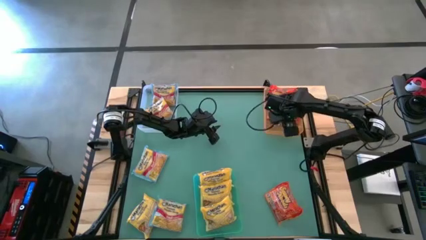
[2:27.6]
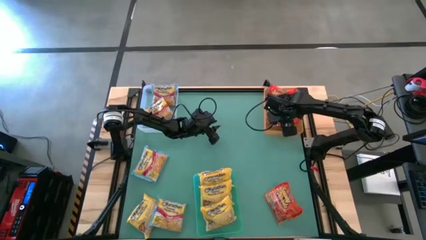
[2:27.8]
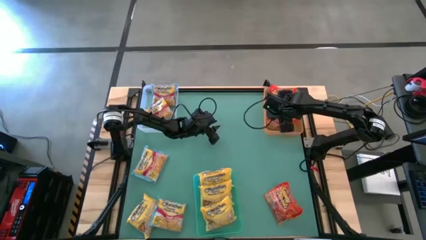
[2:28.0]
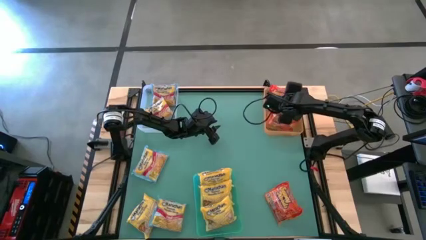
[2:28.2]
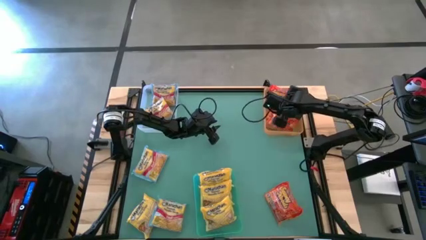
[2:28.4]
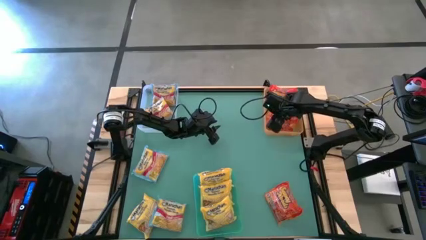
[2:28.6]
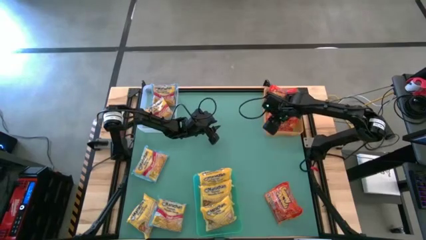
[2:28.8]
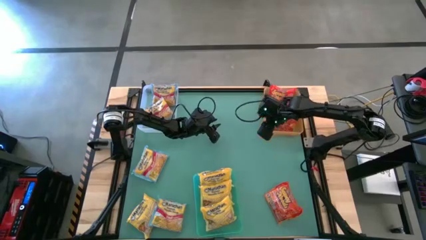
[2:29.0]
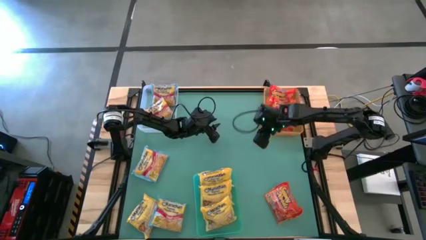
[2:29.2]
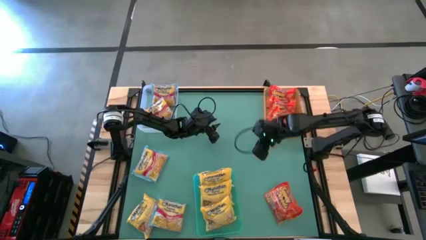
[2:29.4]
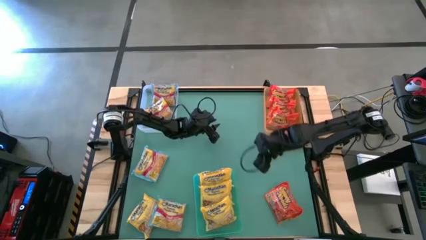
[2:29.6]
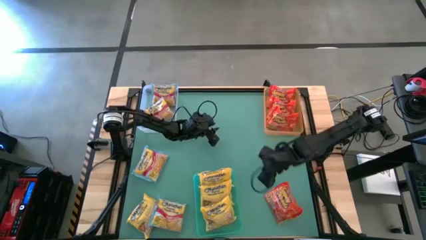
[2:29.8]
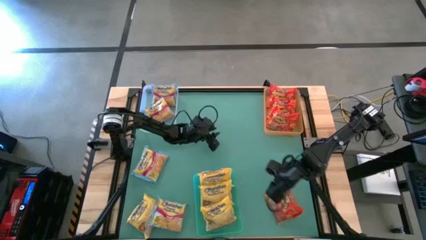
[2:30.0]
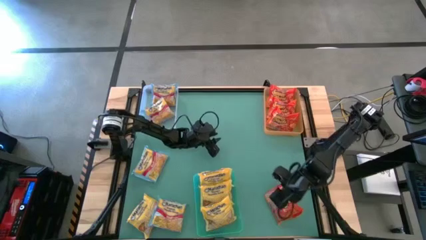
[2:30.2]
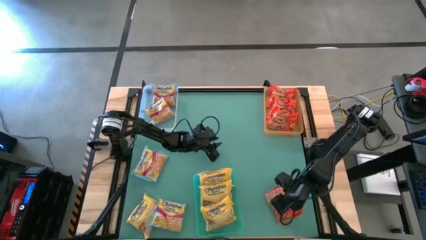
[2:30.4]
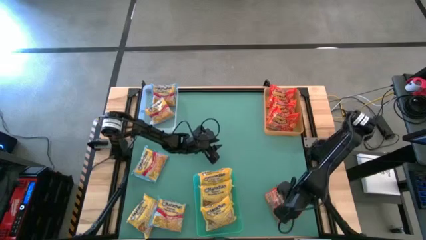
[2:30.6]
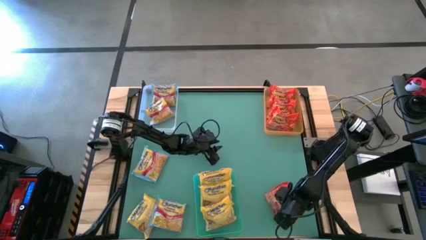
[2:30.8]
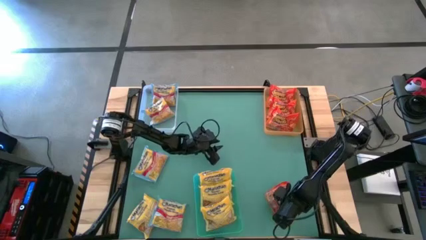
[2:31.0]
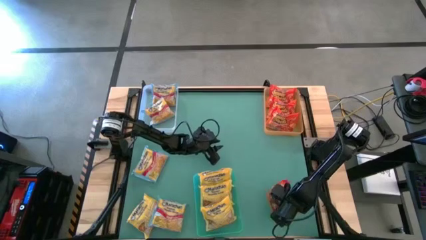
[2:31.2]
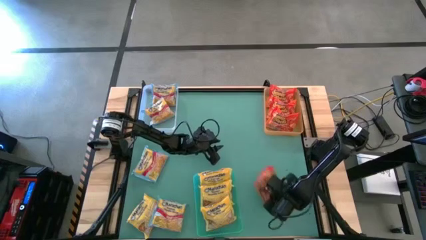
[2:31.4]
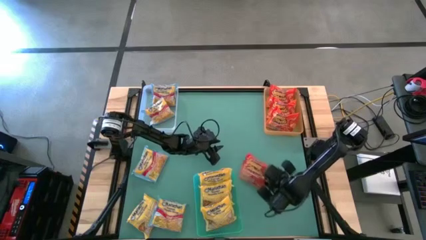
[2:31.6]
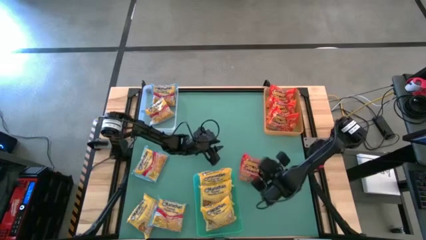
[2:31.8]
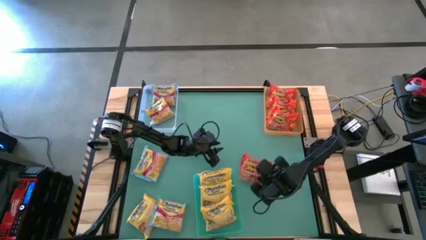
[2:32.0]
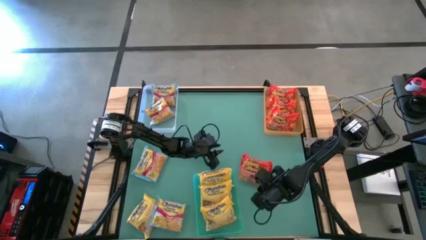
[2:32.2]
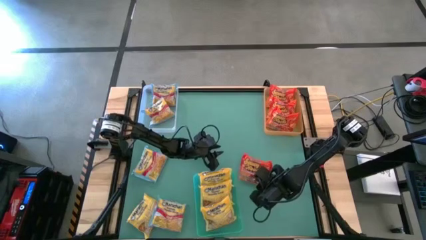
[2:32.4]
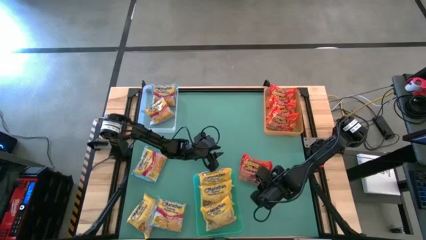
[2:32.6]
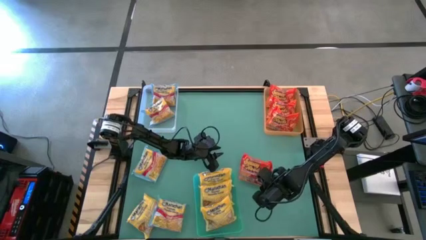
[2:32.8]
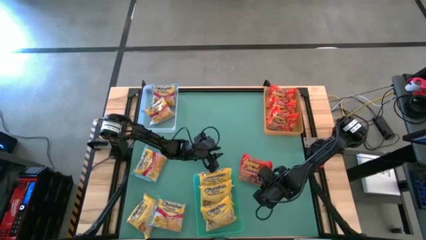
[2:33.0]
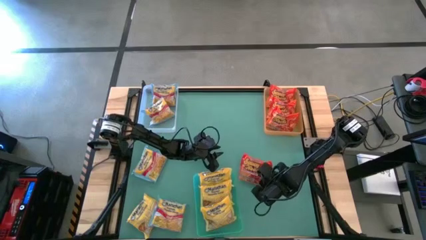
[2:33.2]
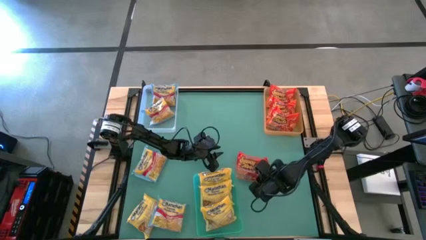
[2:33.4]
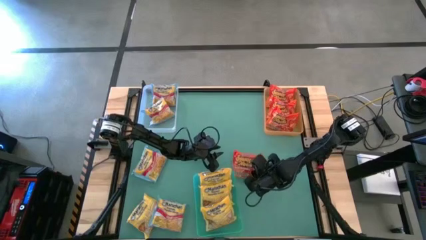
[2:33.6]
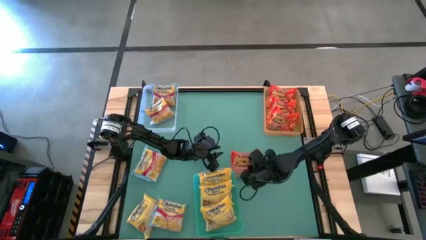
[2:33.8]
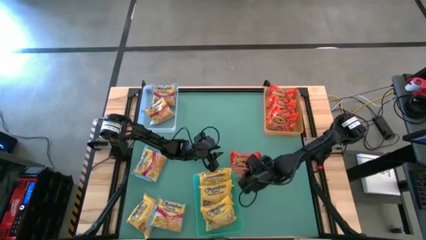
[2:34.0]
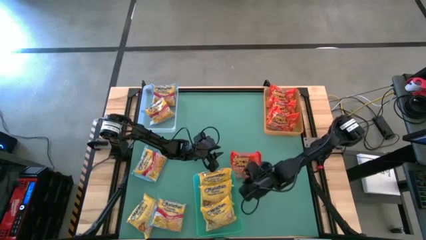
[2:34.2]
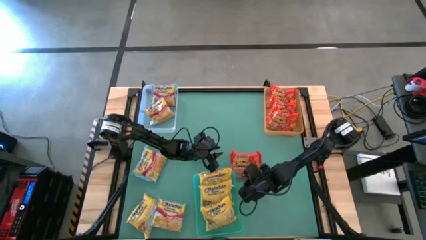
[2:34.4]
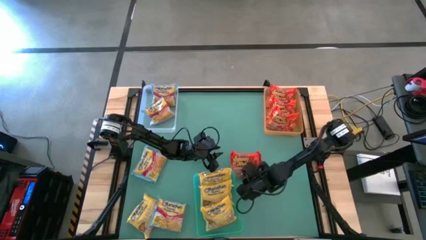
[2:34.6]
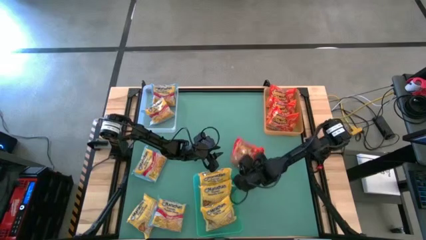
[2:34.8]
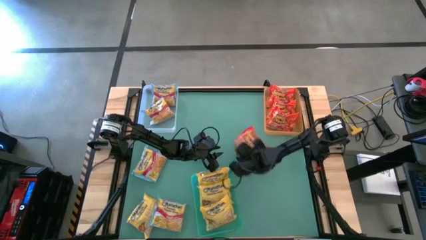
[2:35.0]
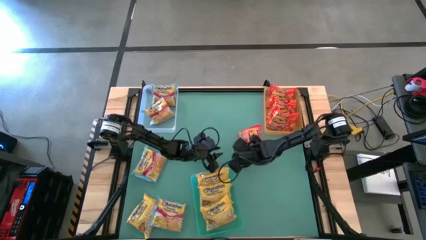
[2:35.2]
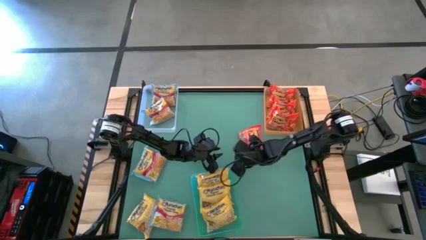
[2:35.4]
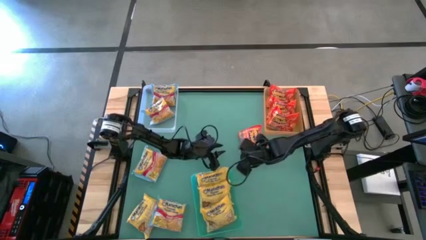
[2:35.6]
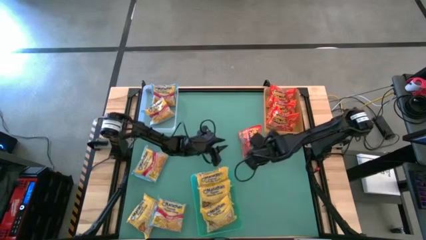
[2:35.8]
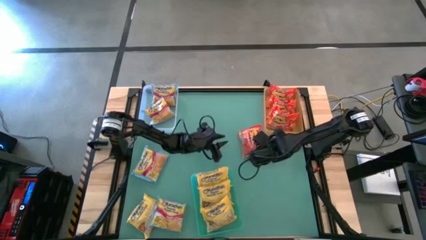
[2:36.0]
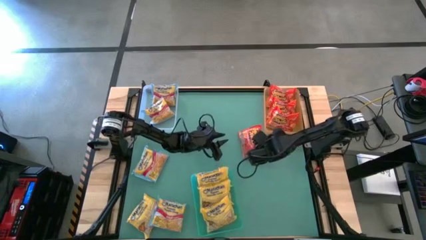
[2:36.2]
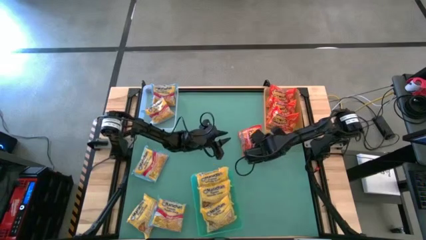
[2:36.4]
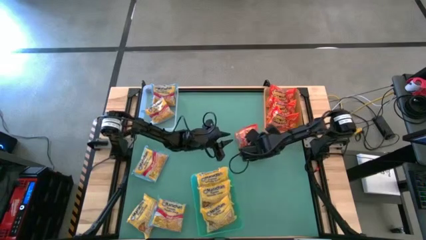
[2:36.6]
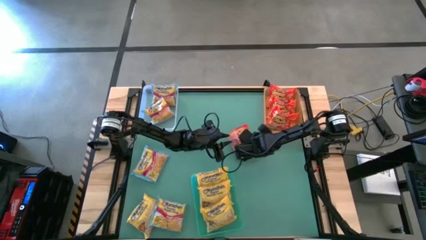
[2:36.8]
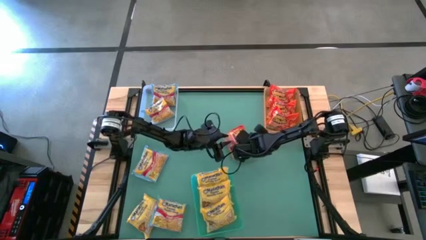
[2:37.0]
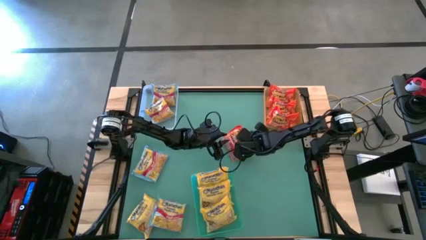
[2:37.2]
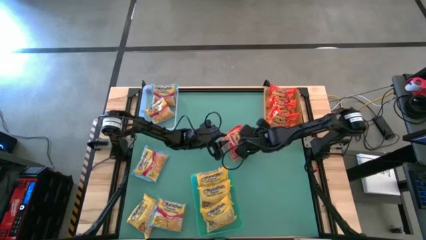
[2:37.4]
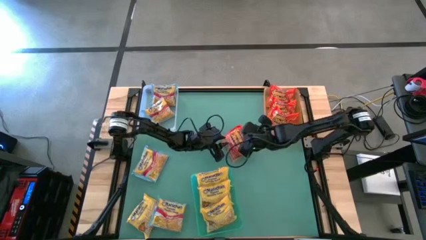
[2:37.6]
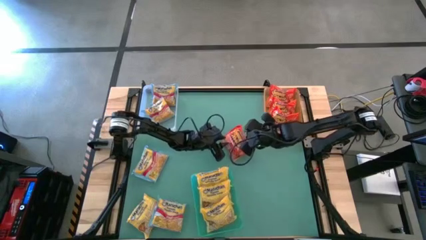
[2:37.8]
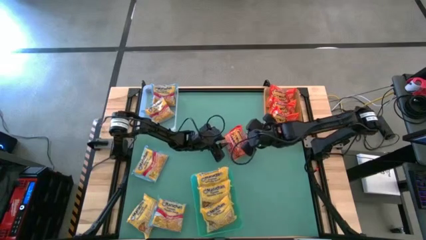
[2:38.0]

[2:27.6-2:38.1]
Task: Sort Maruchan noodles
Put the red noodle pack into the orange bin
